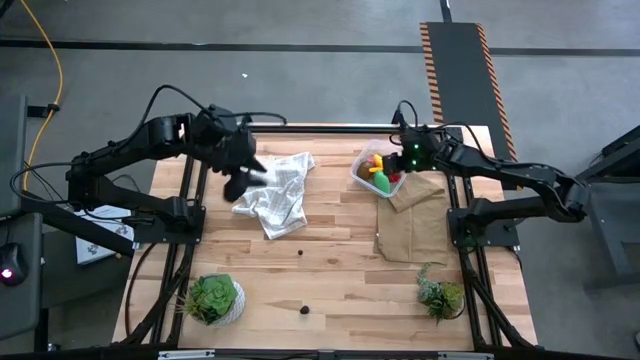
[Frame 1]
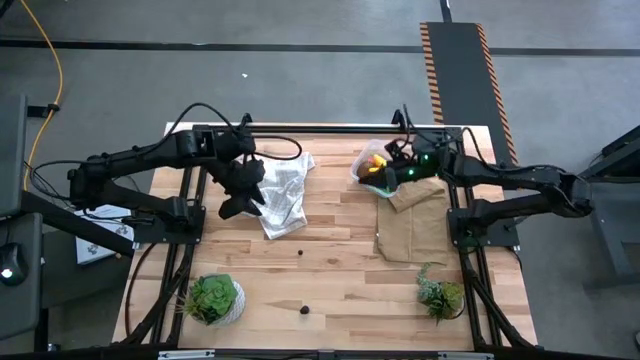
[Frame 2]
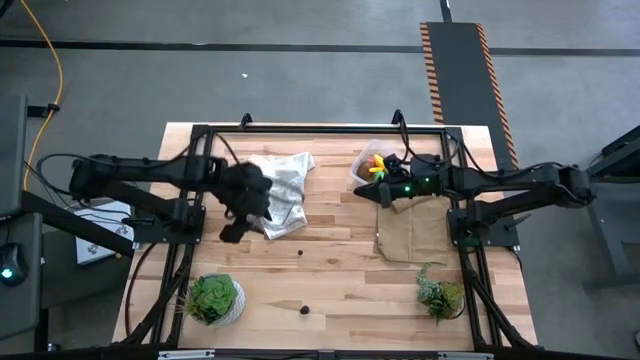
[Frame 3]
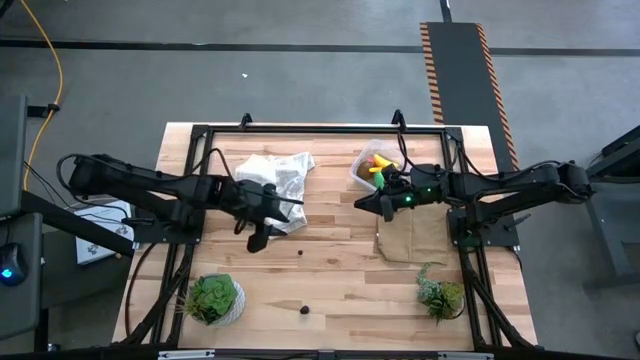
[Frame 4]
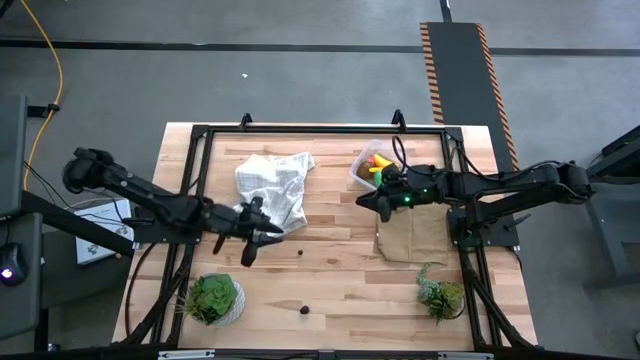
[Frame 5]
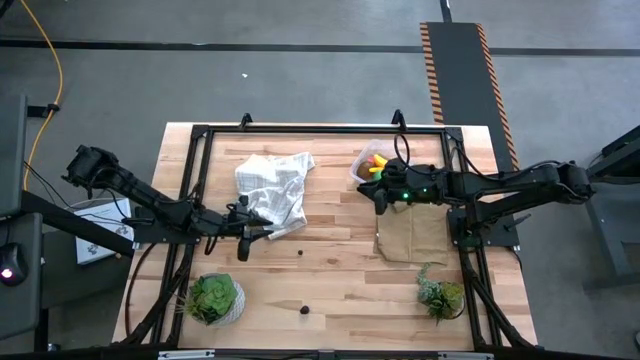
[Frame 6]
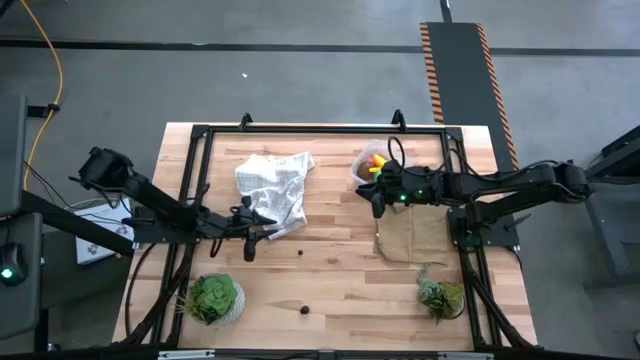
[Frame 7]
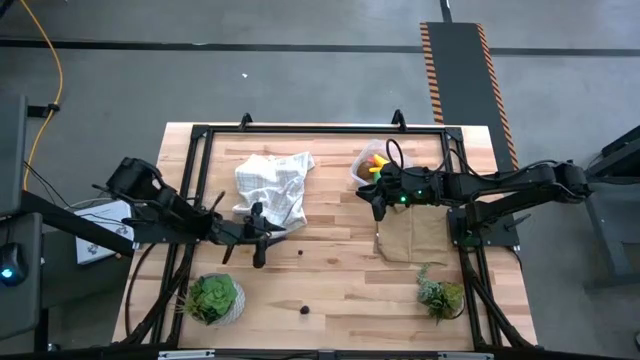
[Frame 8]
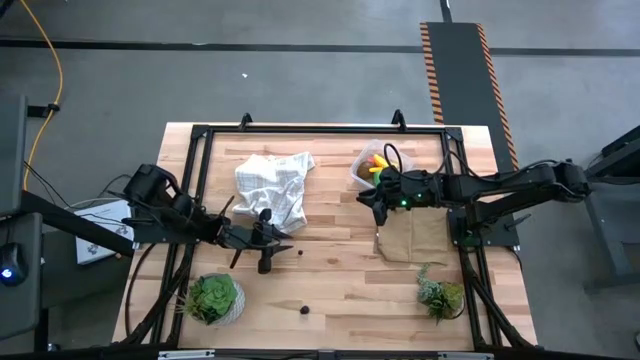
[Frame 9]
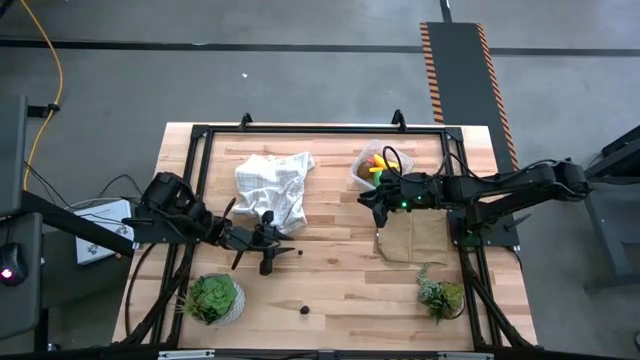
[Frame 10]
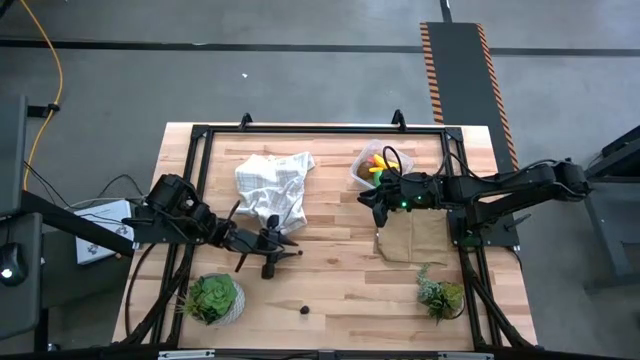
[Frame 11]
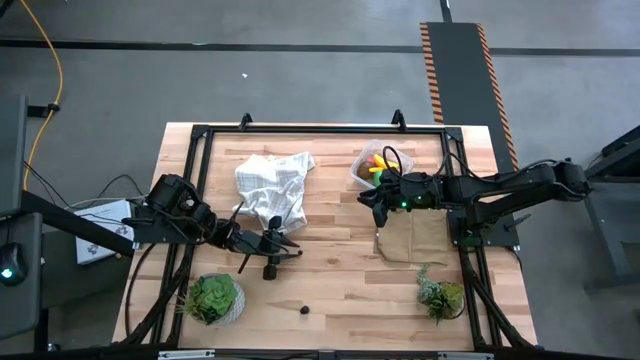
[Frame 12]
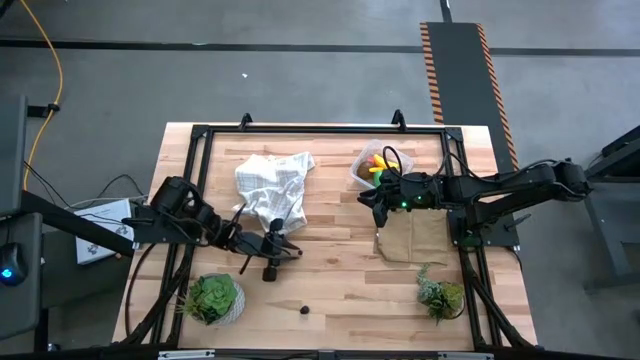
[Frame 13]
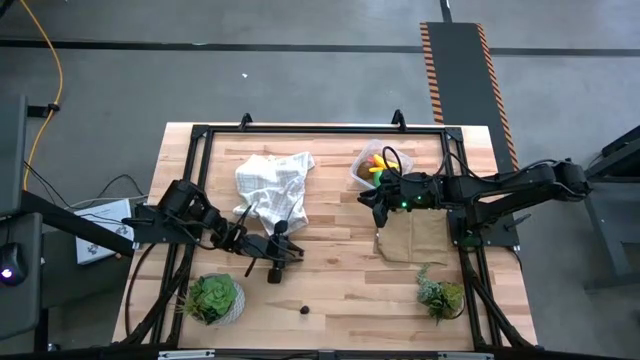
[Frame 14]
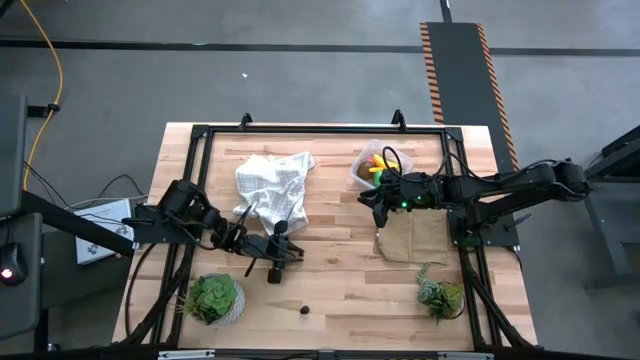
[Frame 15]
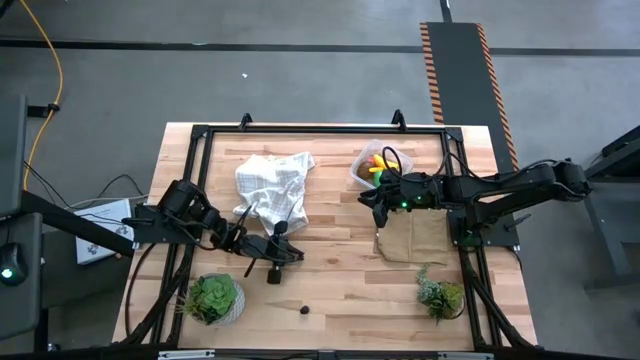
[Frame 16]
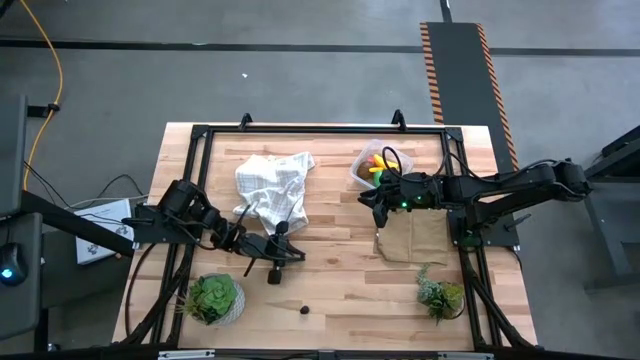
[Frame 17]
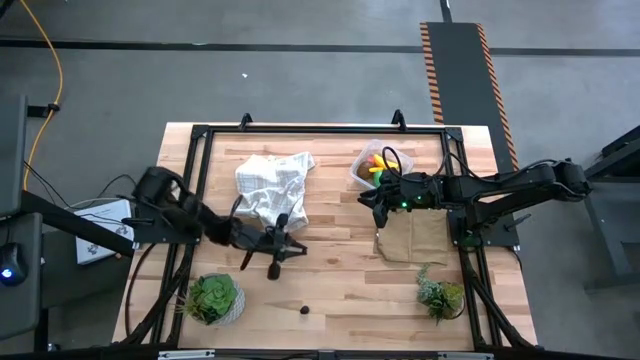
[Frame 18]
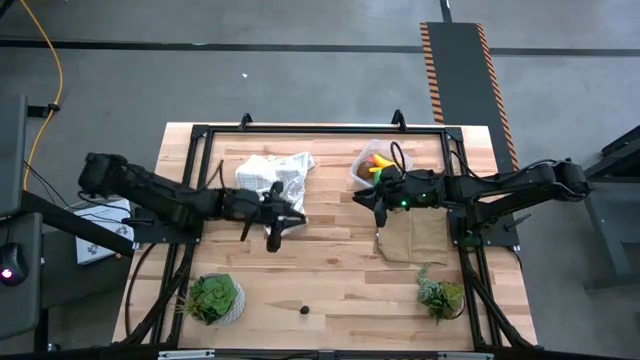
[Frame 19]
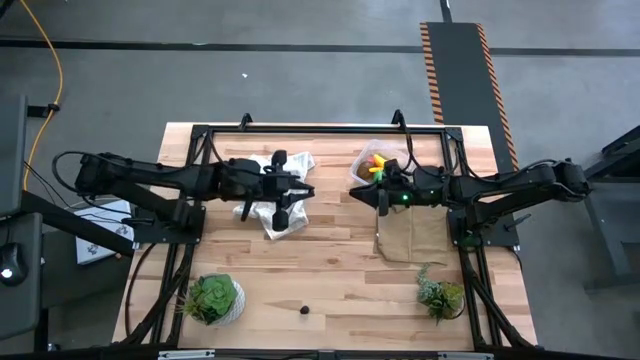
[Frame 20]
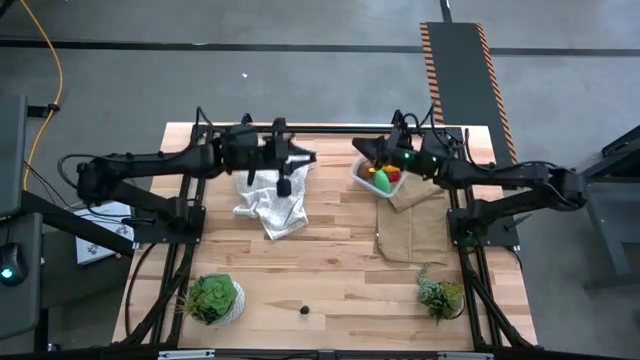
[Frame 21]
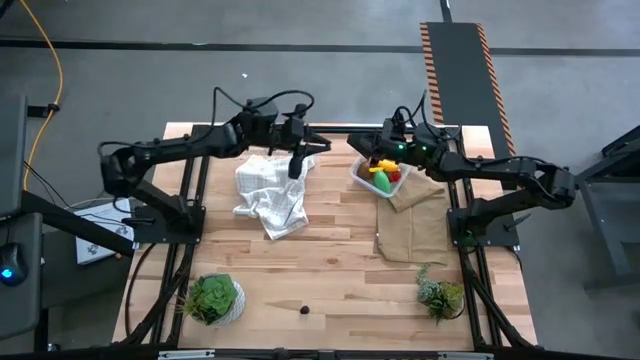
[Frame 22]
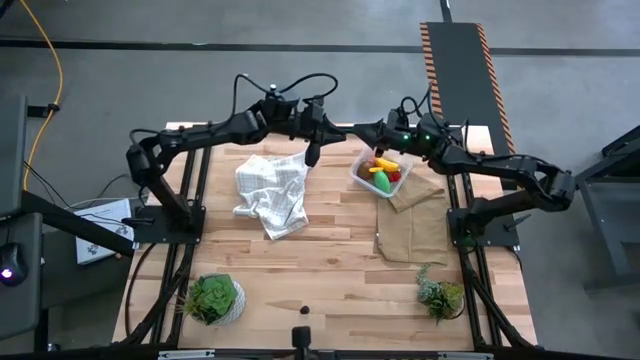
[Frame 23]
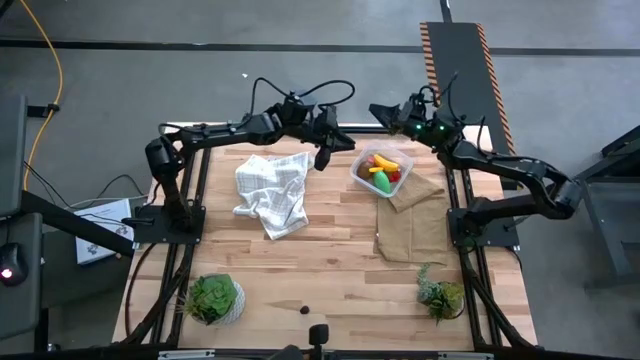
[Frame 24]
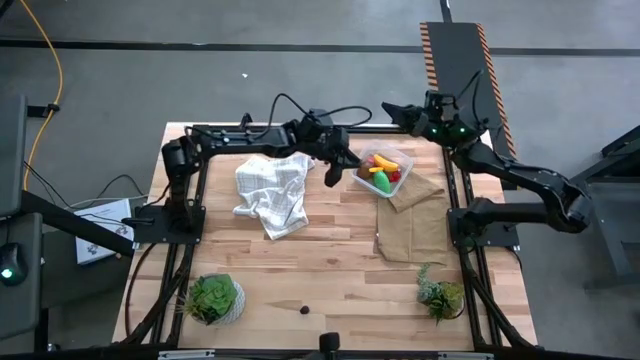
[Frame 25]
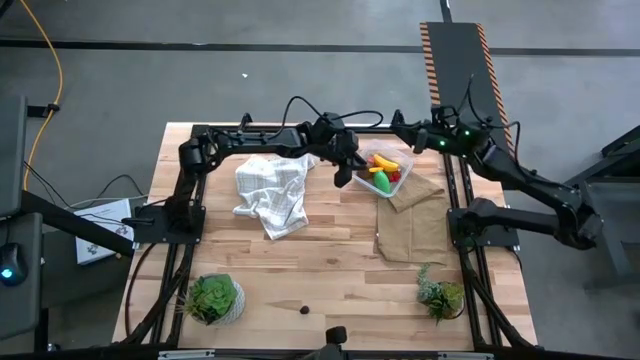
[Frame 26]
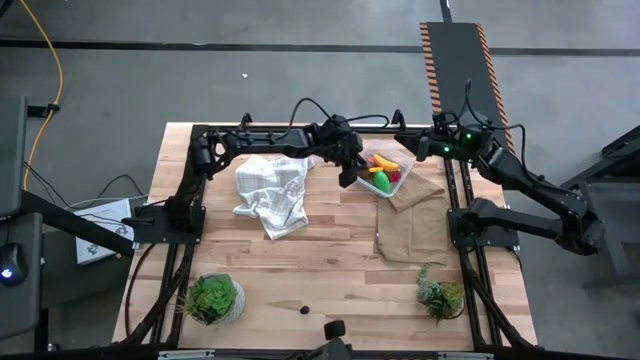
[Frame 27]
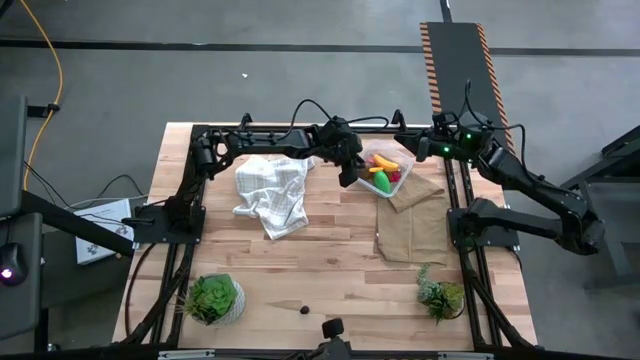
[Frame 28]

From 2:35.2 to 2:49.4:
Task: Pick and placing Produce into tupperware
Put the blueberry into the transparent bin
